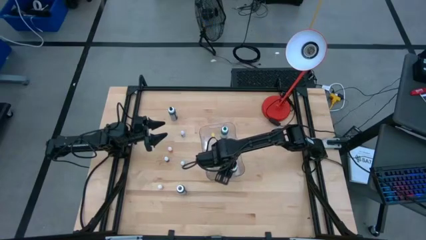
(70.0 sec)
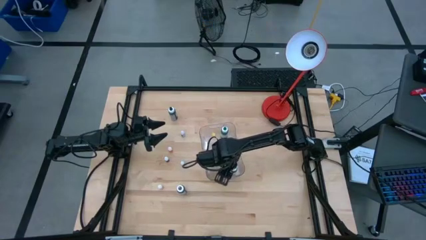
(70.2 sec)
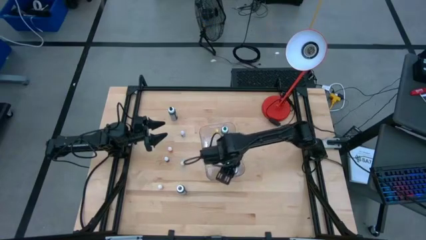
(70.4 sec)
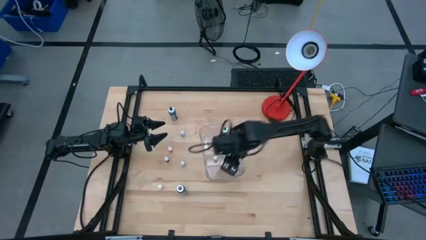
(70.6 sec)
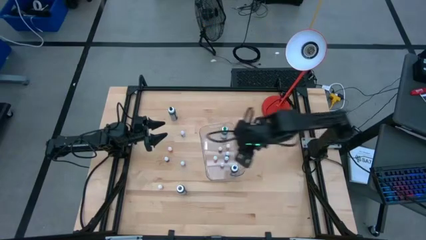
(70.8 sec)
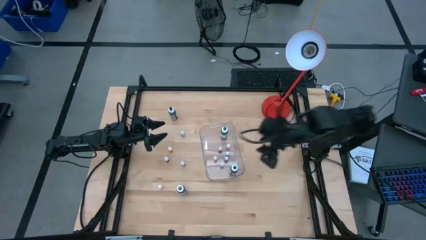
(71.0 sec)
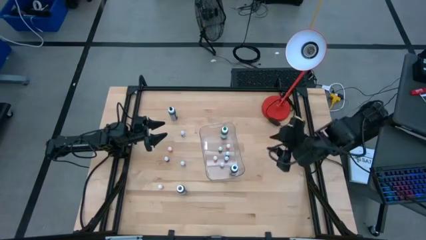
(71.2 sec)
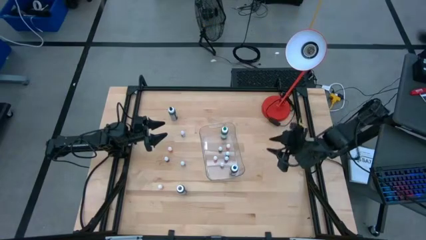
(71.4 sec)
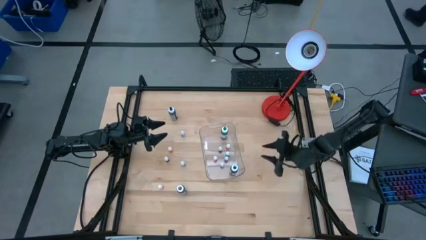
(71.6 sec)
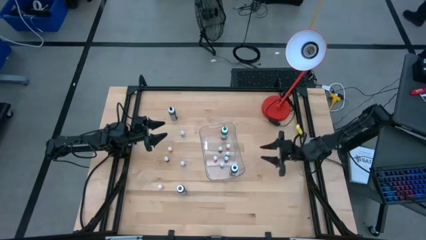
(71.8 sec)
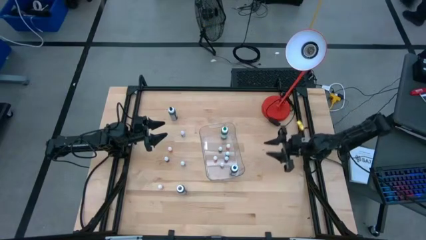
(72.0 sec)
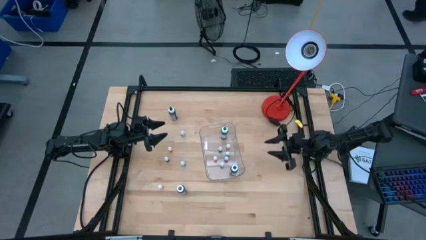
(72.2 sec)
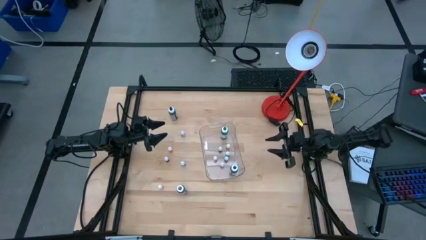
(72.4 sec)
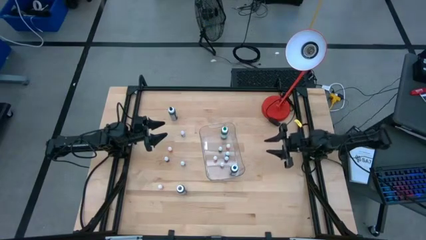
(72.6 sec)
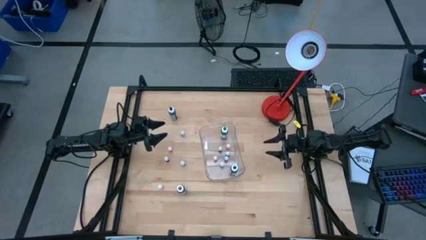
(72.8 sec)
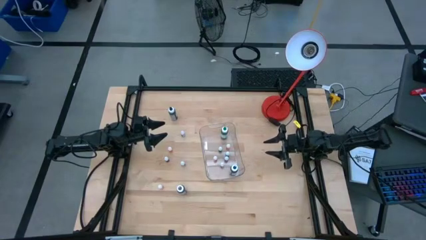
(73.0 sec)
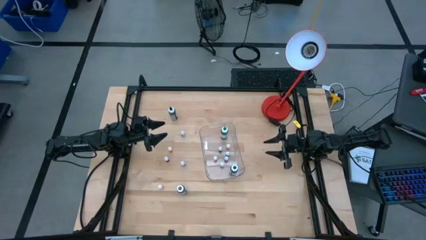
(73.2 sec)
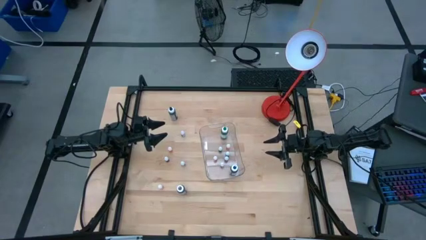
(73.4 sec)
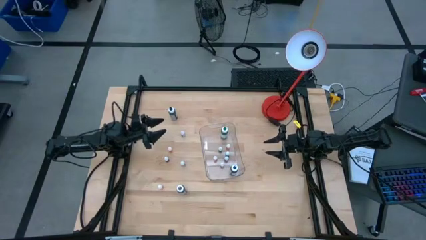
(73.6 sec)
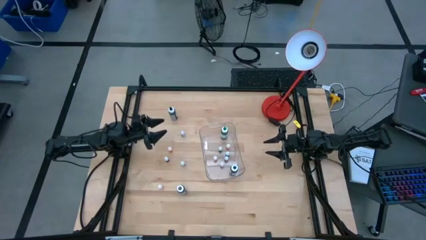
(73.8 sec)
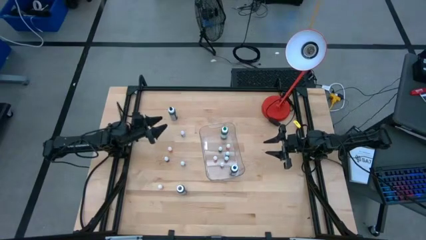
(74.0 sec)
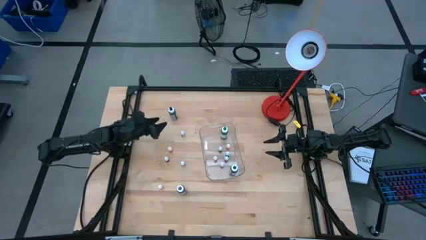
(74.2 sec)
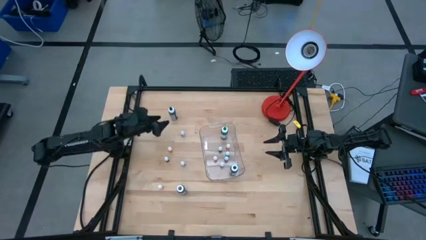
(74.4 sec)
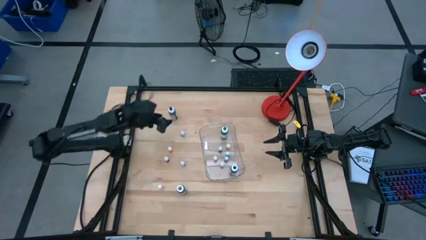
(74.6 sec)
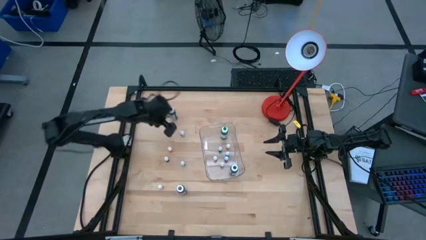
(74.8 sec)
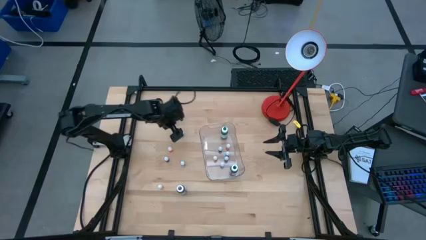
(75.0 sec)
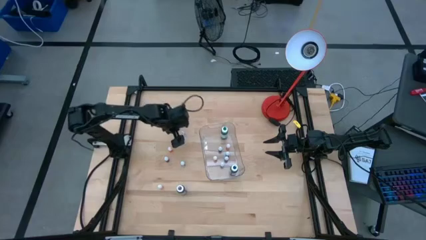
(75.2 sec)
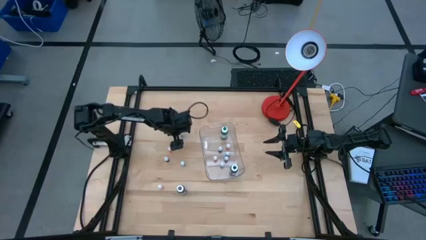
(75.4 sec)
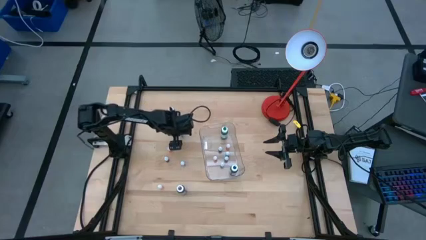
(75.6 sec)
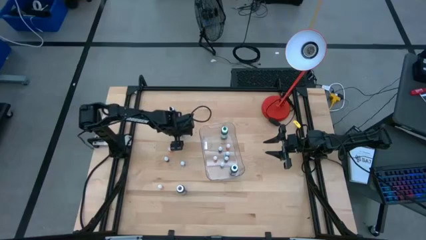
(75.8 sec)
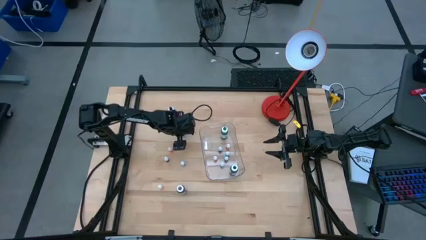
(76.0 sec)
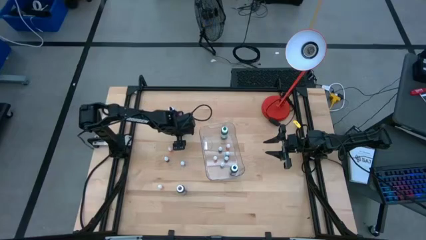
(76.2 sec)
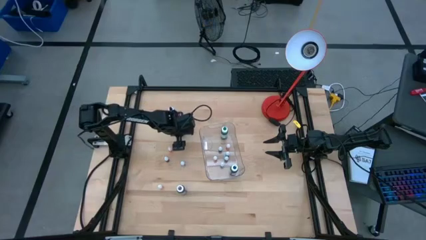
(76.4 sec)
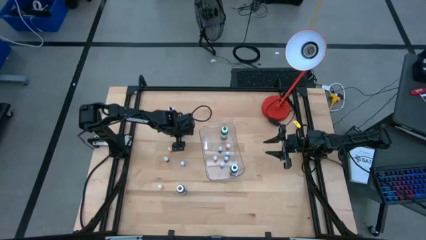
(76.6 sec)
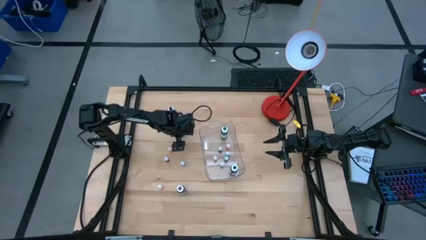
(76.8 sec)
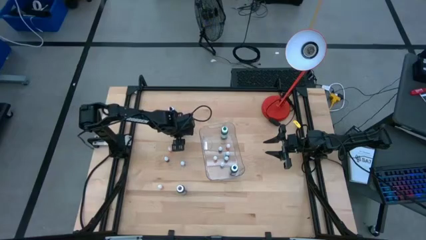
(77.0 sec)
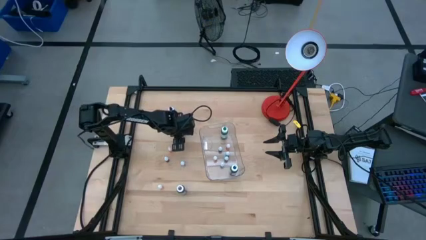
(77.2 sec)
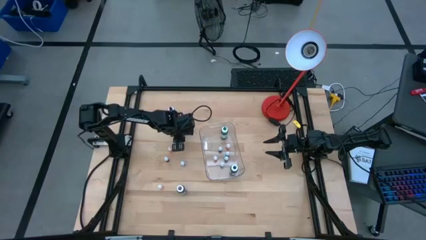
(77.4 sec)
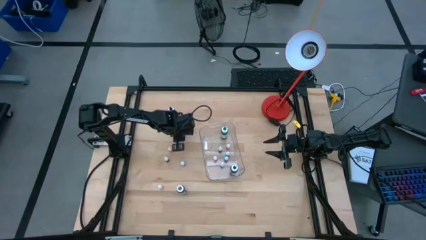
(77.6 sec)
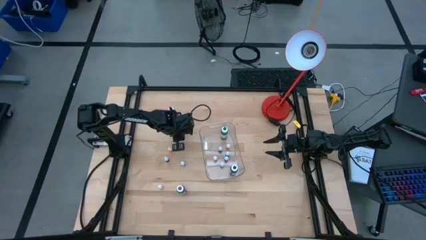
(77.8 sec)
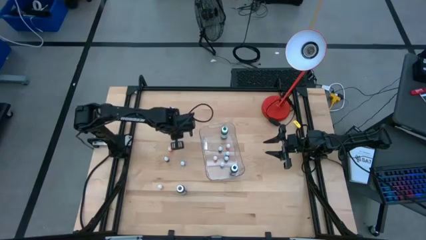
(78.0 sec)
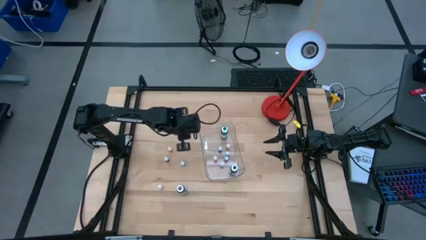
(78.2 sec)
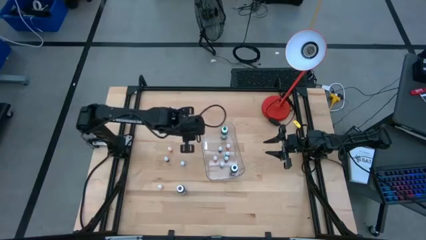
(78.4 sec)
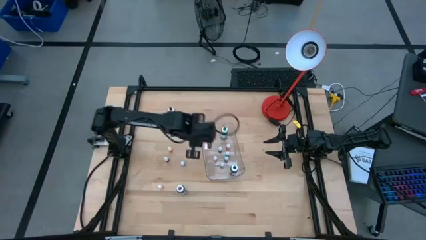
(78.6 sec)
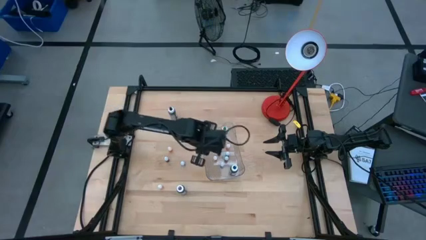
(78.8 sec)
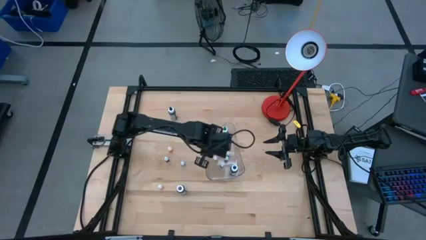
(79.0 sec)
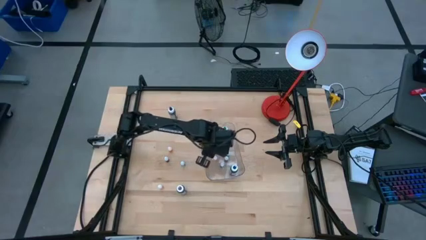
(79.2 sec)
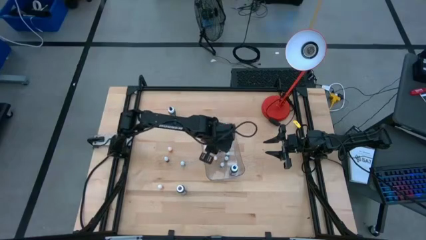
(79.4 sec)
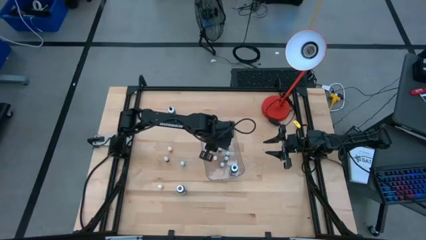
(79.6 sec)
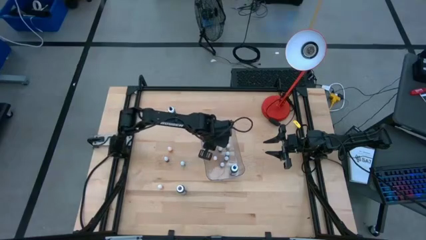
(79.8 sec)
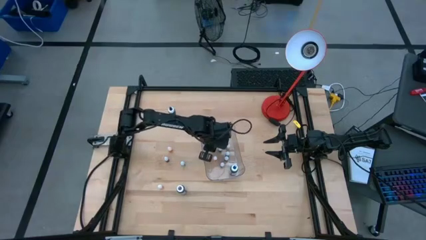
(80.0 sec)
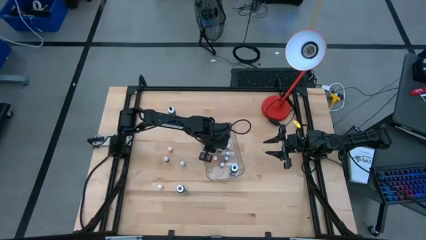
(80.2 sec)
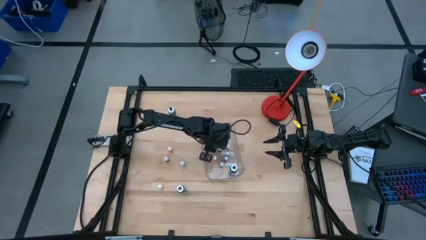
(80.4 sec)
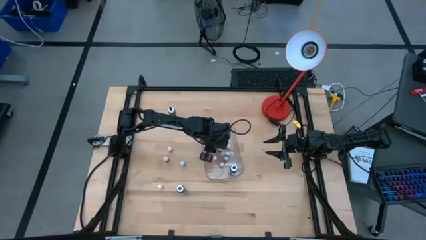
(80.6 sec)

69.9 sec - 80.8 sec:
Task: Pick & Place food coloring
Put the small black food coloring bottle into the transparent bin

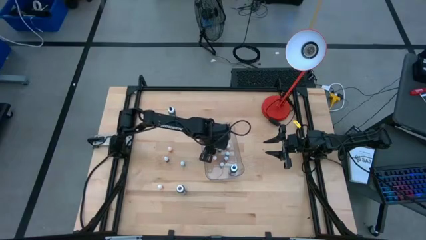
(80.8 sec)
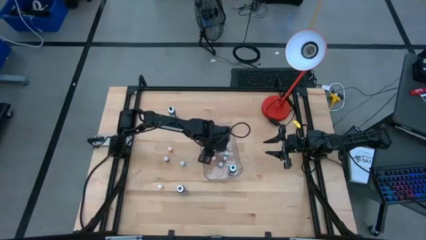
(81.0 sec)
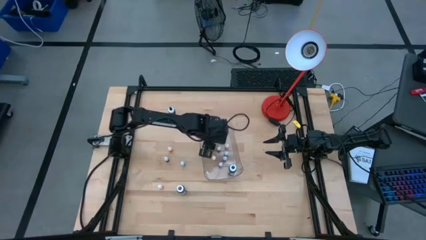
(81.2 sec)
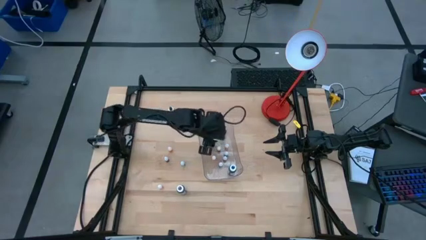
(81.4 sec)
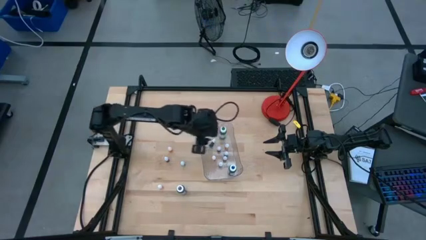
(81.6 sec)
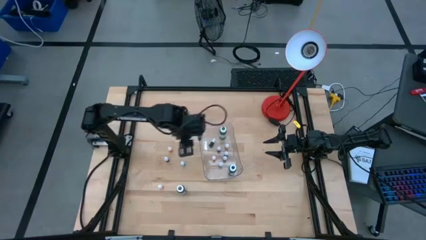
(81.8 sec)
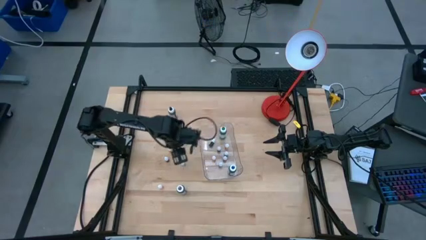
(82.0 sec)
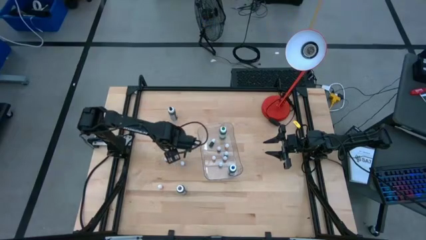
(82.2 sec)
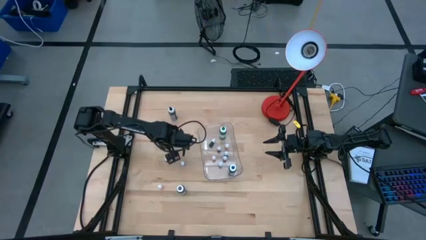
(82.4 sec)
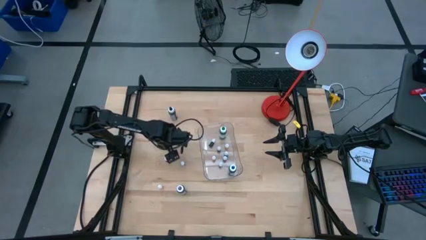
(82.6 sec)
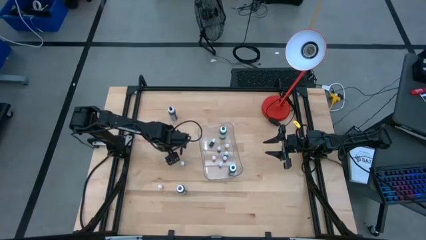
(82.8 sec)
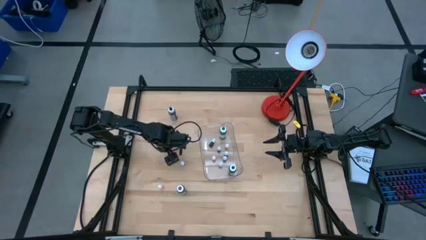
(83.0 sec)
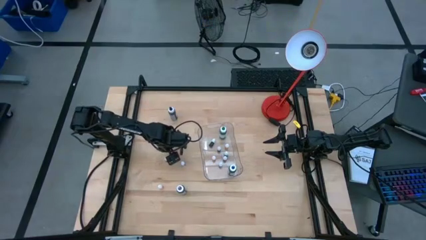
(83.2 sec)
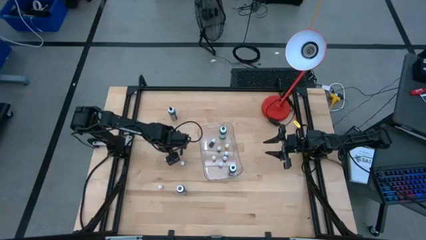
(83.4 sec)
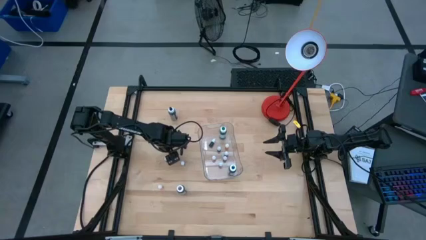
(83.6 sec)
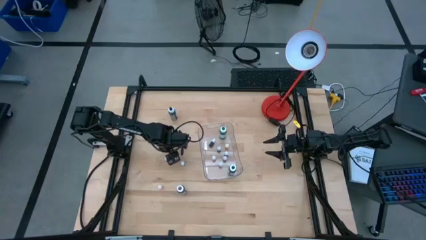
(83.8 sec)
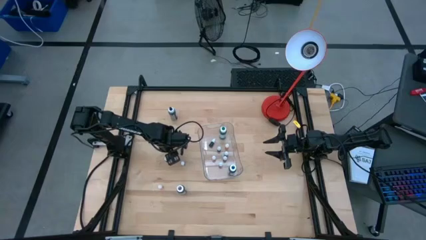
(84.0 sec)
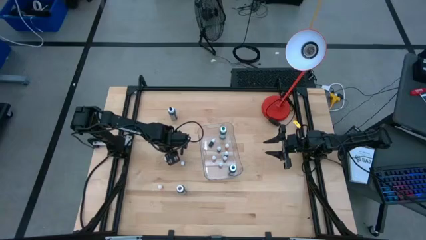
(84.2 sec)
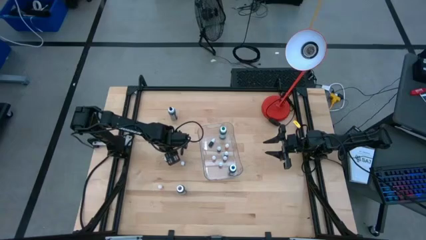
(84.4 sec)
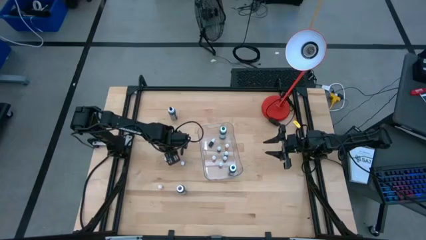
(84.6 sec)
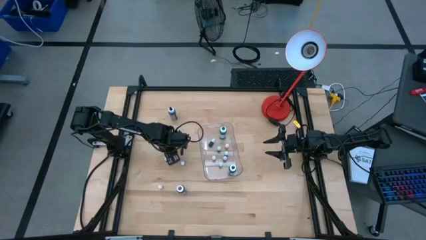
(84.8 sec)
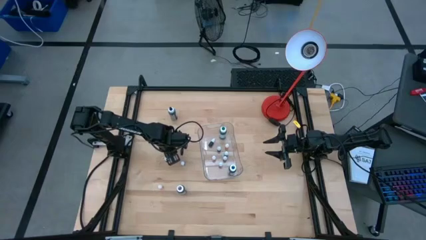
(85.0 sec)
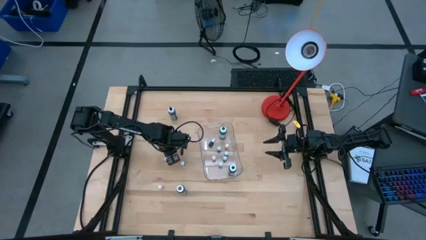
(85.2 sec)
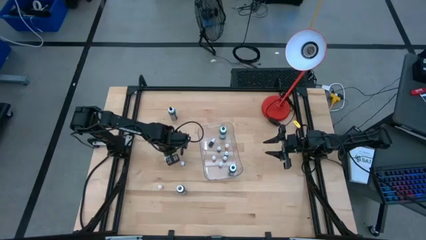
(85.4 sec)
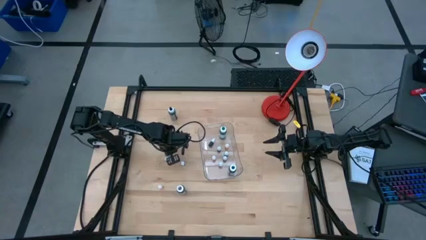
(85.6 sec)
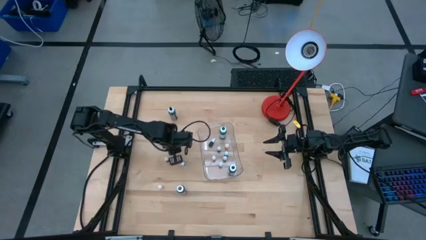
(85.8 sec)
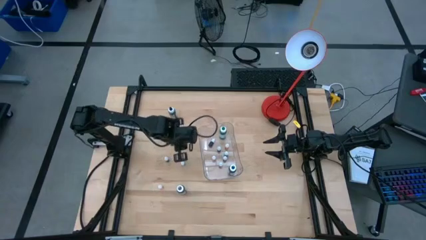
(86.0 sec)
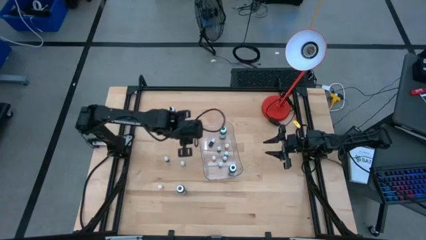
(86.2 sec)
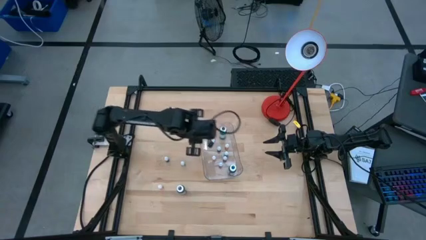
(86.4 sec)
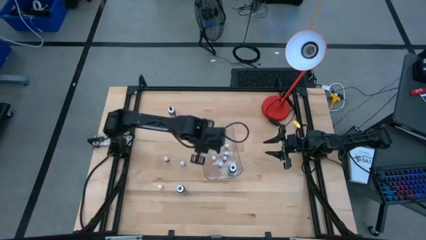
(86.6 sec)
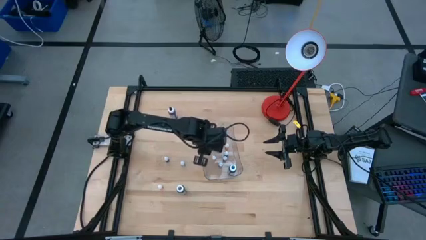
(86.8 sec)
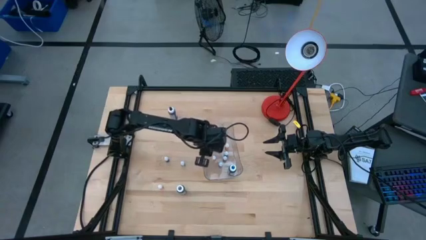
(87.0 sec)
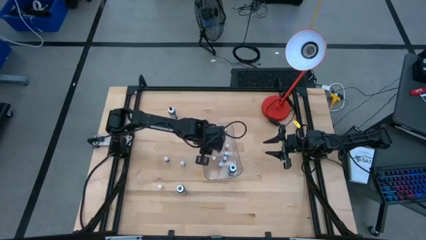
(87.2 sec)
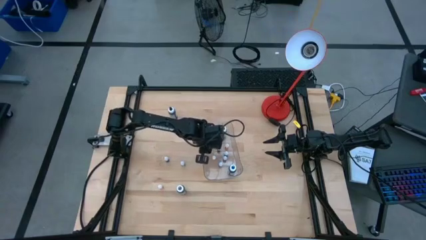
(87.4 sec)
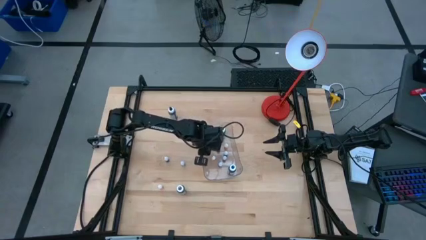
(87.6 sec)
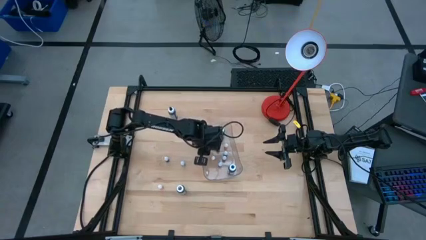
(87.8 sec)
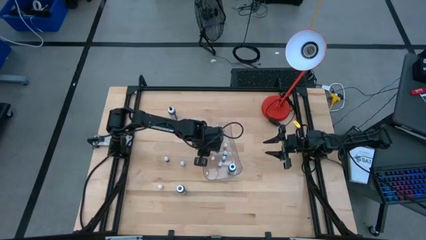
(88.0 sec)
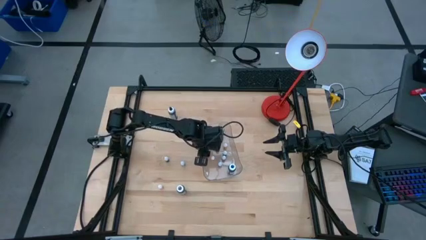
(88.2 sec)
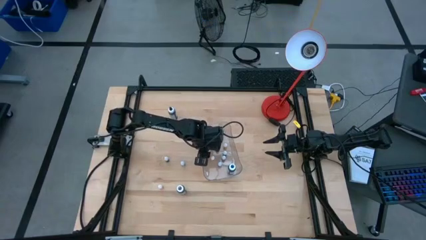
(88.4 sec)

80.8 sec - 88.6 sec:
Put the small yellow food coloring bottle into the transparent bin
